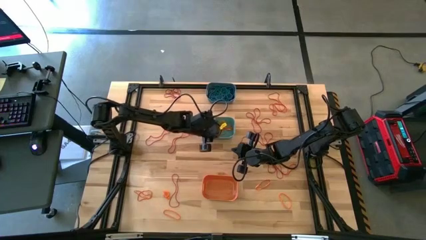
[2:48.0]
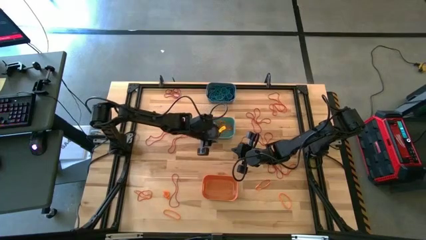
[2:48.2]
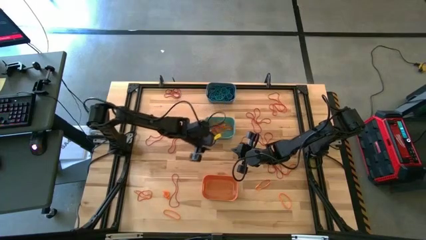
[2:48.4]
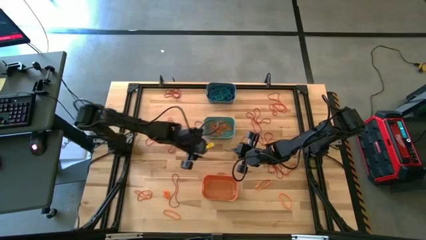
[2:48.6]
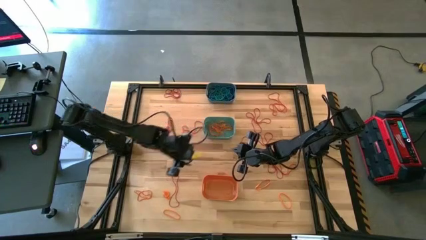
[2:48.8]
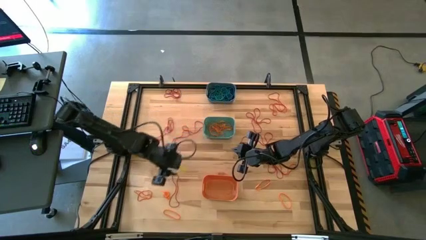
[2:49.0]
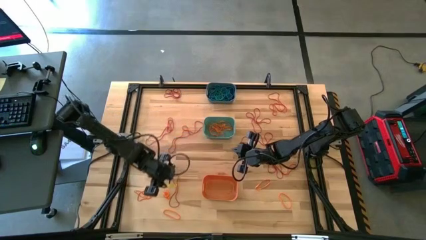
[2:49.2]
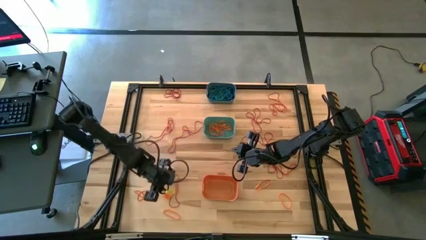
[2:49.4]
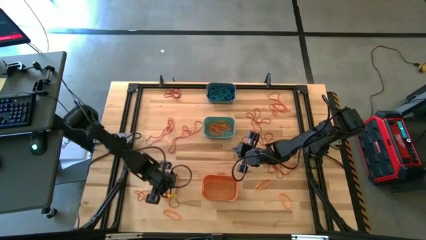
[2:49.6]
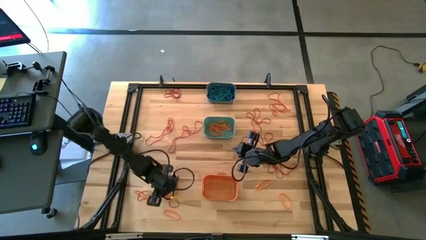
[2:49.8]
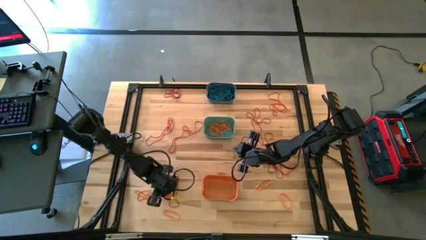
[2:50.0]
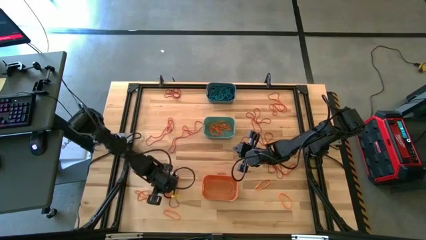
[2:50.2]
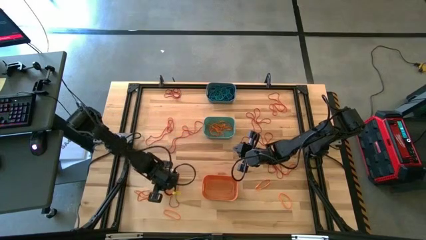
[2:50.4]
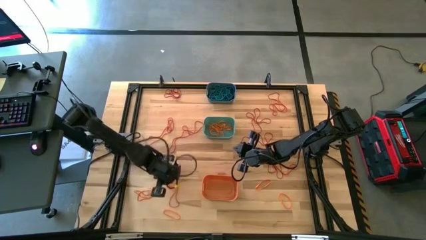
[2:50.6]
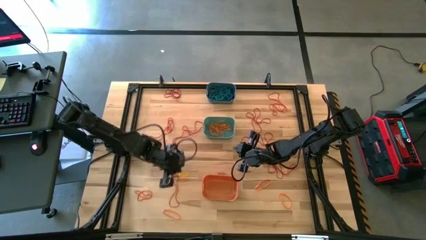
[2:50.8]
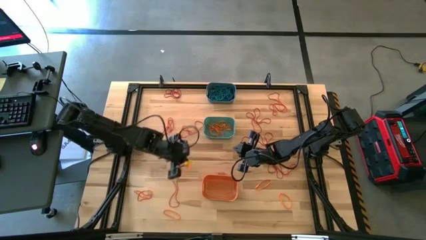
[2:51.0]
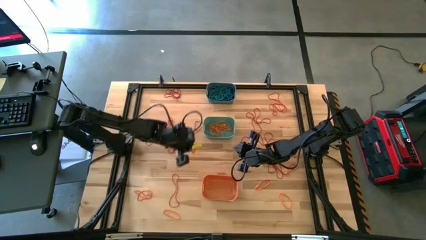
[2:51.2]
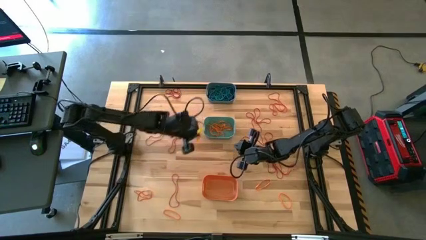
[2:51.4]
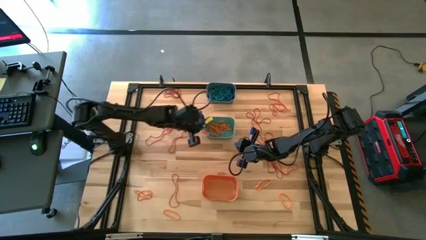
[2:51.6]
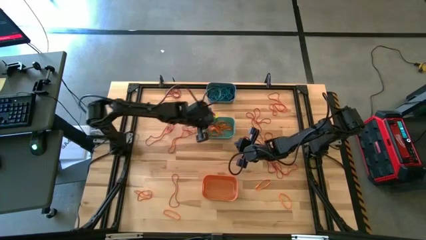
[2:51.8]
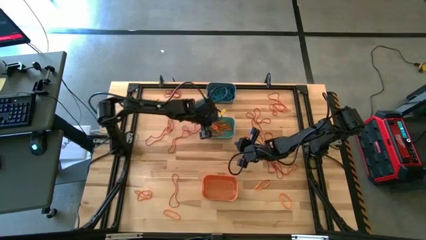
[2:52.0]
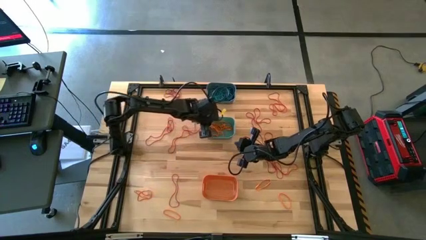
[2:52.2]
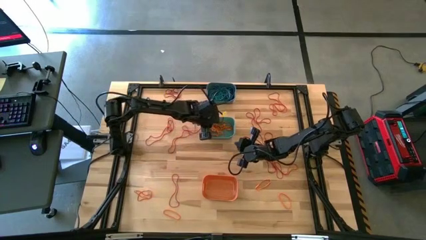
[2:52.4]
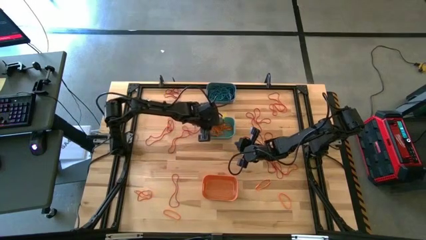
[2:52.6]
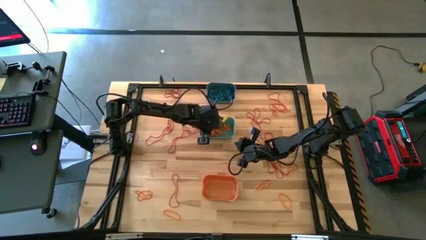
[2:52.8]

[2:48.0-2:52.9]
Task: Sort rubber bands into baskets
Put the orange rubber band into the green bin

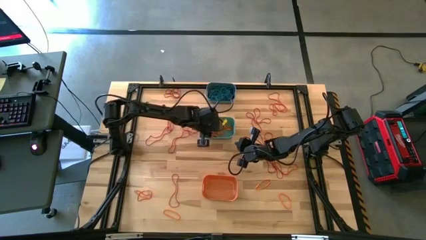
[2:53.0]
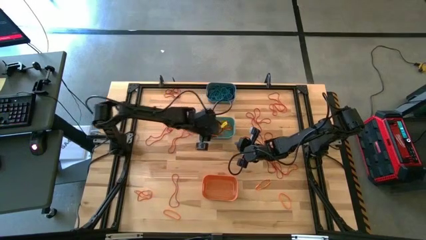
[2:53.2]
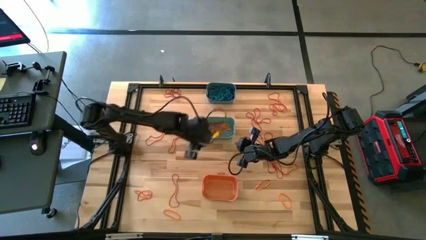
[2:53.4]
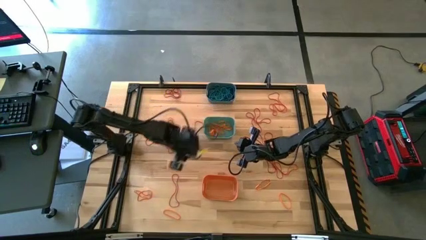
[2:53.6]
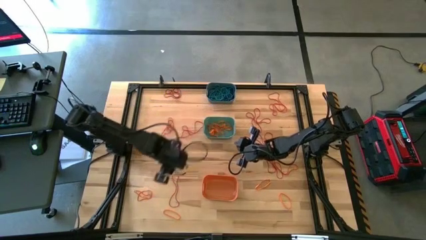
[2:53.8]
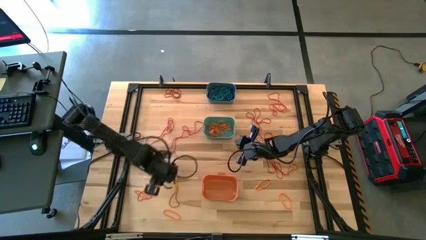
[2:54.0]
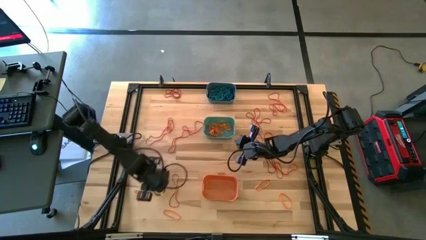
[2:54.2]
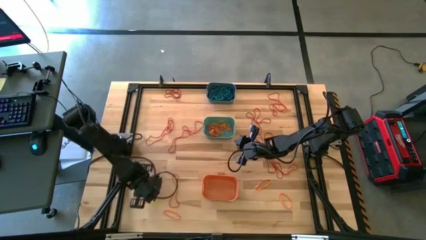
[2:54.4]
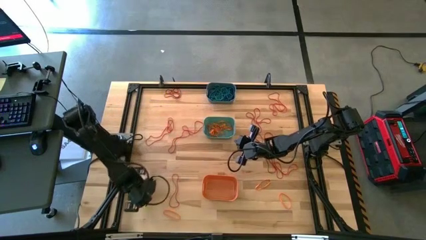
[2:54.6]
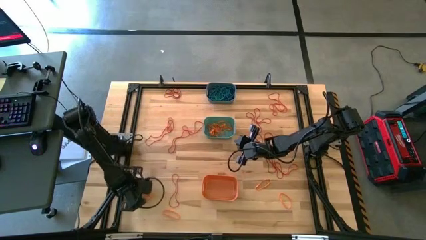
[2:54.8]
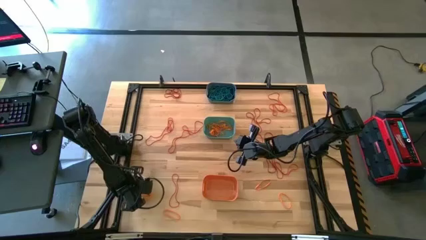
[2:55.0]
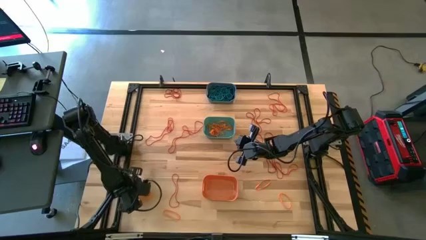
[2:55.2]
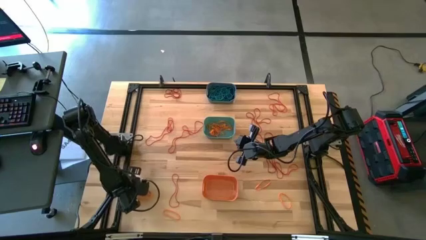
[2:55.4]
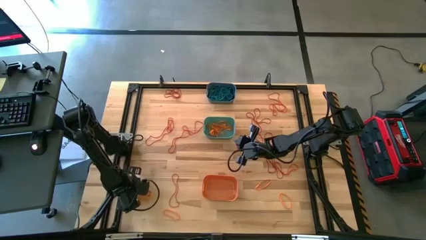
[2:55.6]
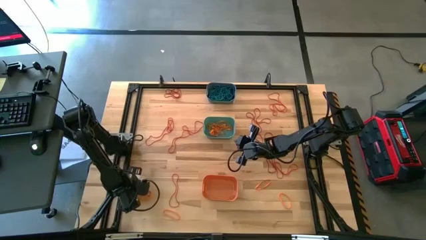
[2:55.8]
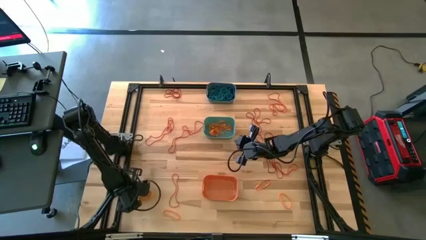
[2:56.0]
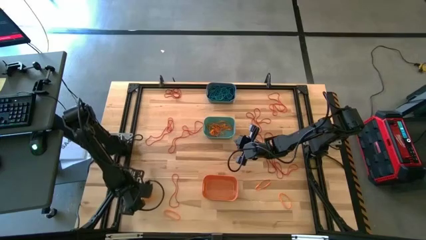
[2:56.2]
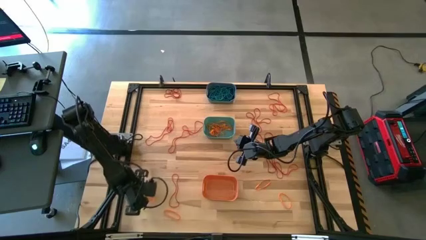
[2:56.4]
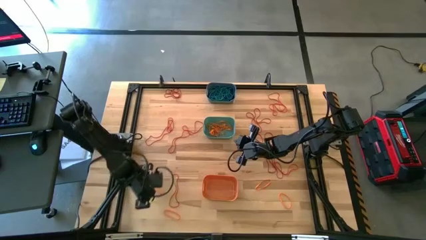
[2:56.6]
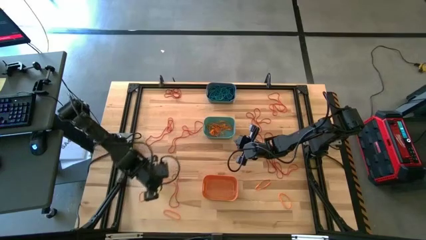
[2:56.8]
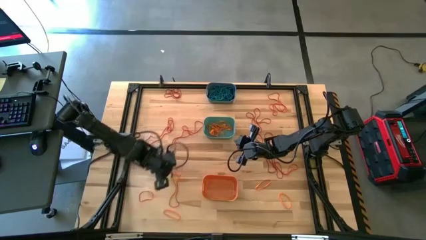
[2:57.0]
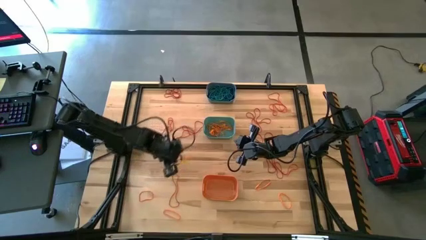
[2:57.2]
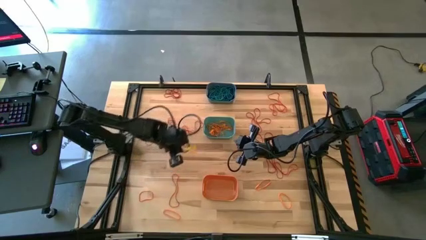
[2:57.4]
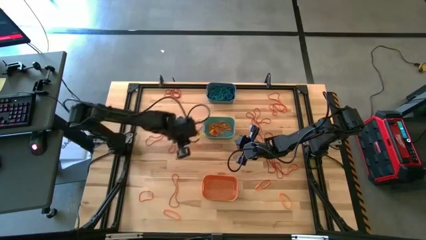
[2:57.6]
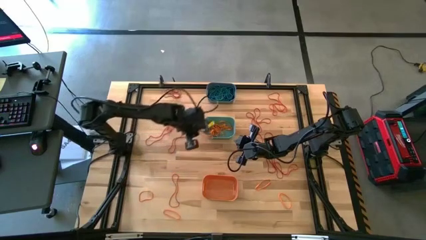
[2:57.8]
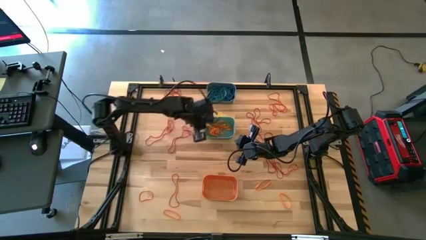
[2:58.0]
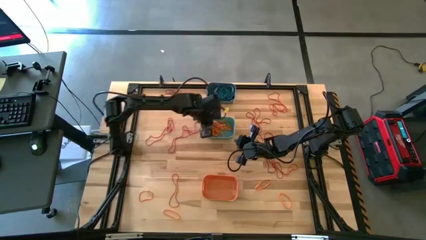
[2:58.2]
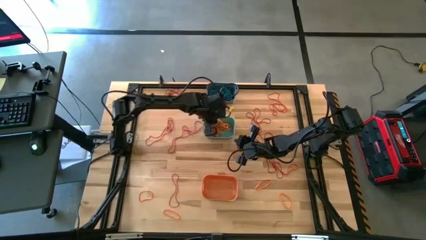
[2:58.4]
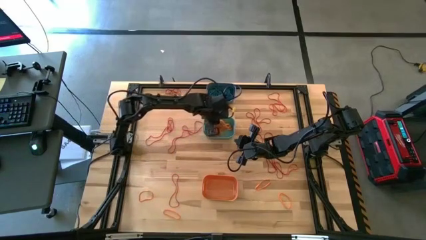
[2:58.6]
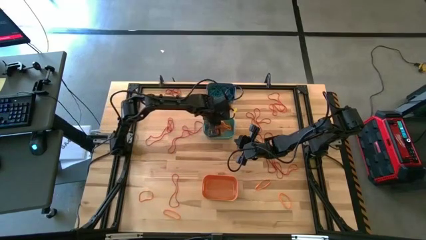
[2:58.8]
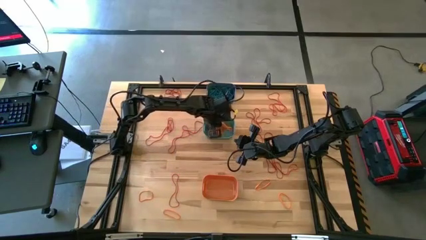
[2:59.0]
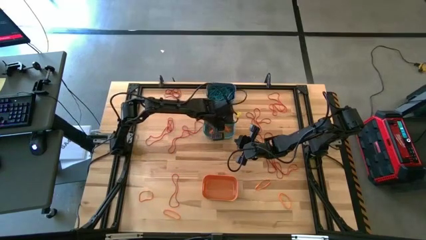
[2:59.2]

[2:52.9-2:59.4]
Put the orange rubber band into the green bin

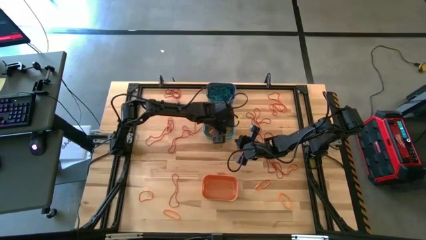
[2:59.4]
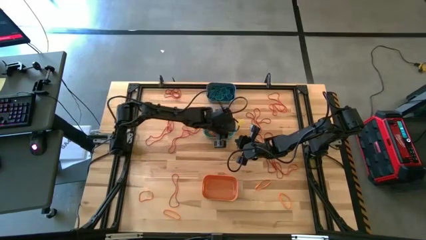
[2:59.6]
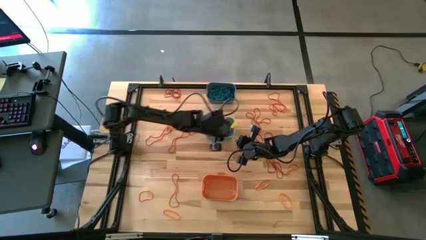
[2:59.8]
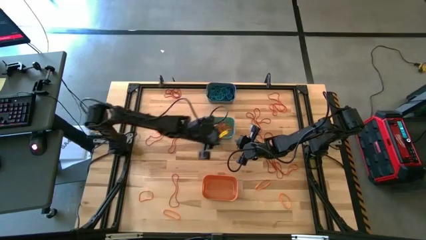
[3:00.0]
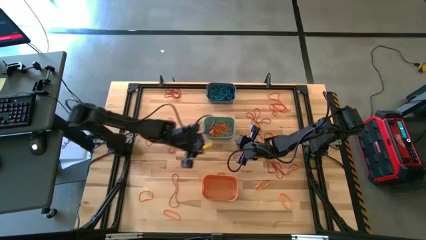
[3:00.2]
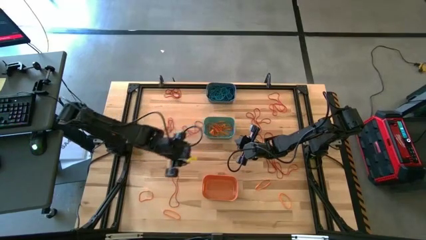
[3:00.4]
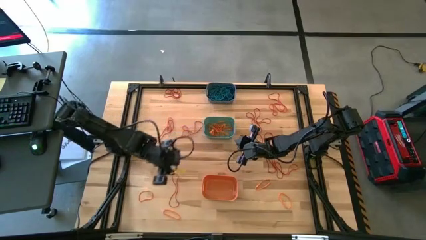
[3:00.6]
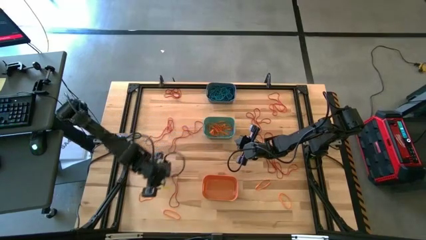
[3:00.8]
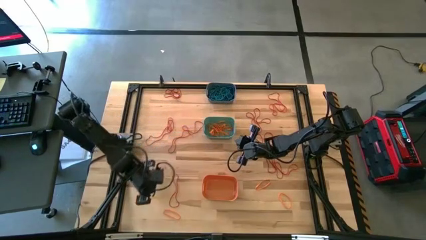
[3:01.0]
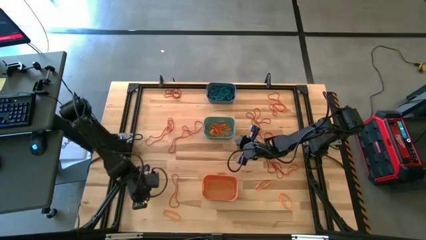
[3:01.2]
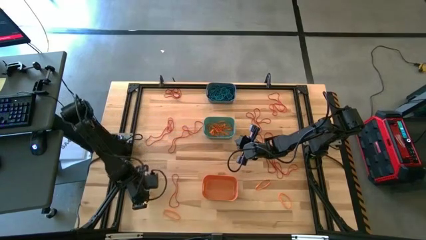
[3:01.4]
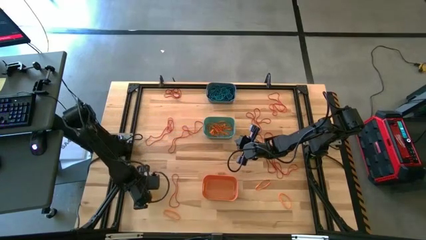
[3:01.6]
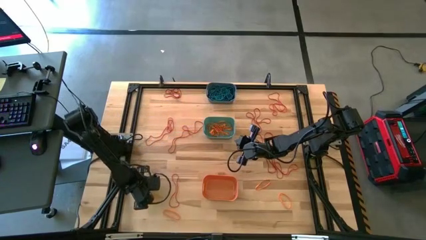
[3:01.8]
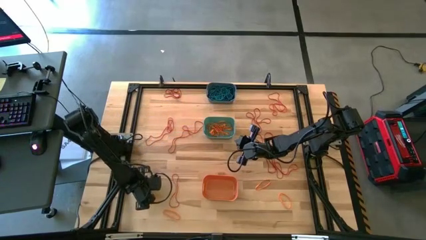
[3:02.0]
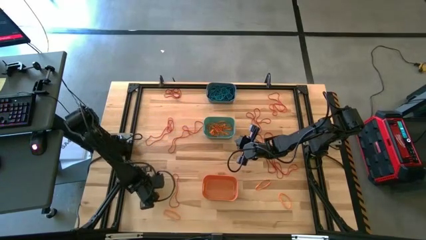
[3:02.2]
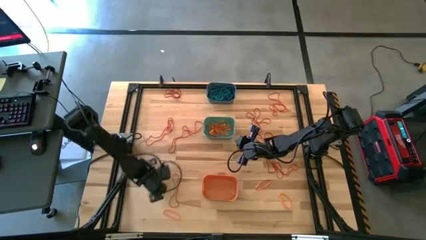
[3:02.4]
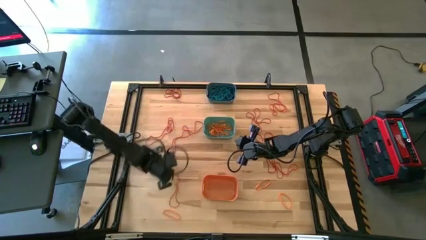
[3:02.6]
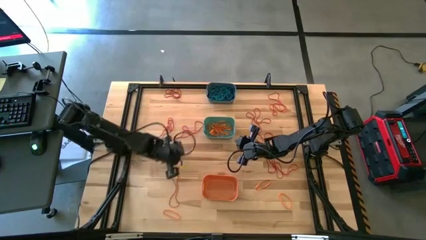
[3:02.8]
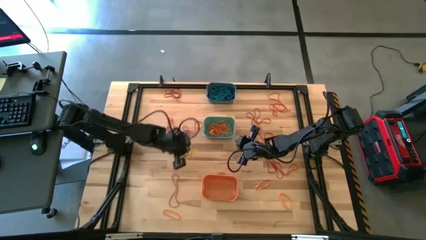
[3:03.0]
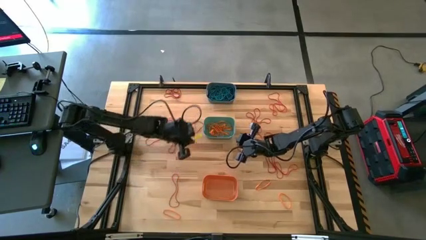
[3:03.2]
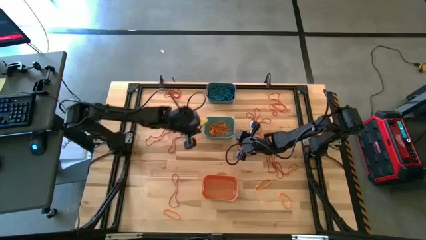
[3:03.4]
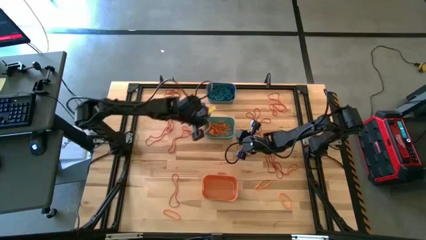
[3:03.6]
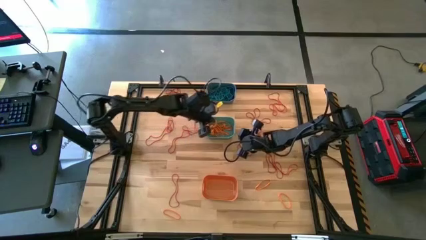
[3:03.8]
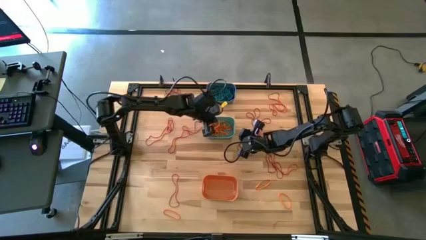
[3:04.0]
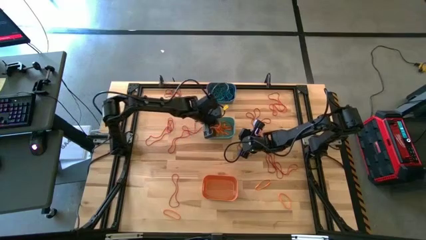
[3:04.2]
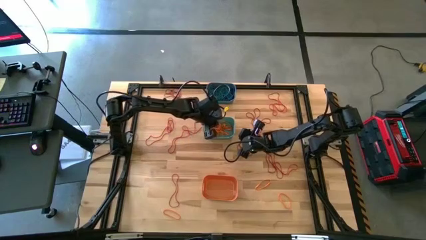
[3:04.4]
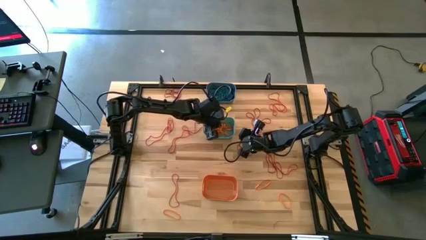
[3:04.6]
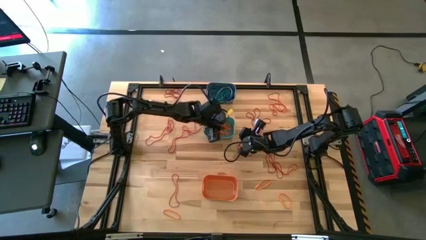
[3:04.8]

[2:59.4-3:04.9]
Put the orange rubber band into the green bin
